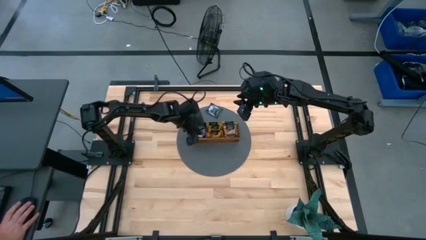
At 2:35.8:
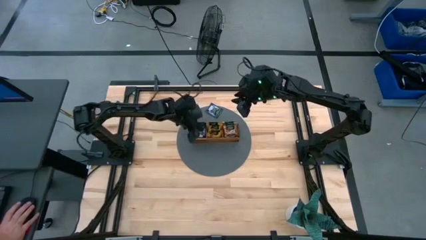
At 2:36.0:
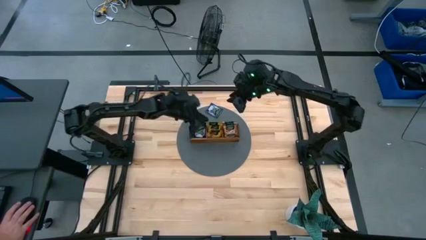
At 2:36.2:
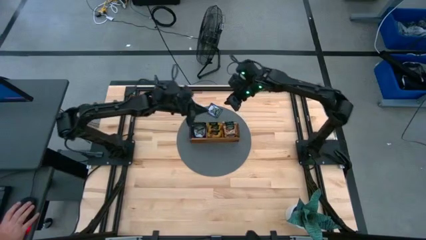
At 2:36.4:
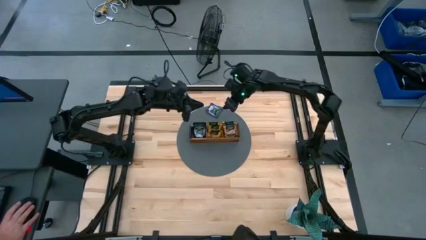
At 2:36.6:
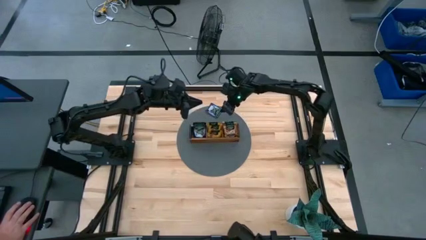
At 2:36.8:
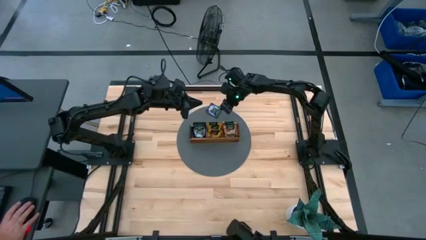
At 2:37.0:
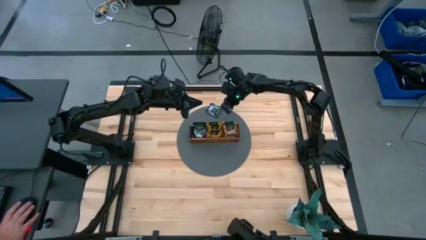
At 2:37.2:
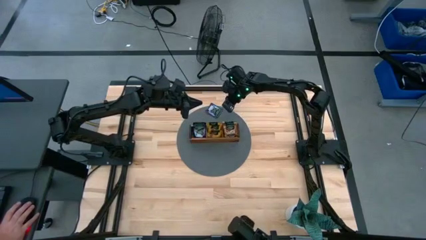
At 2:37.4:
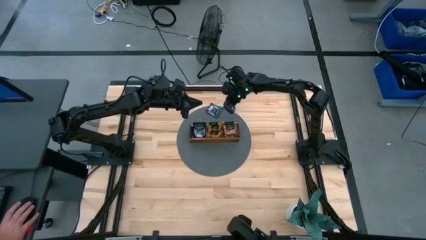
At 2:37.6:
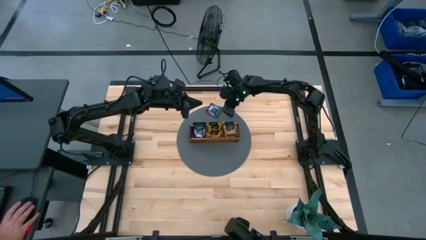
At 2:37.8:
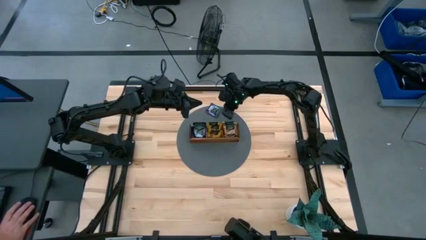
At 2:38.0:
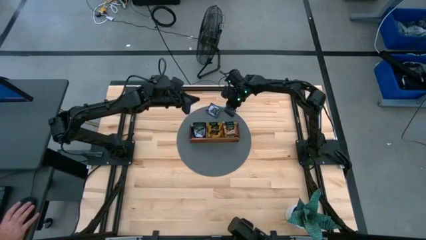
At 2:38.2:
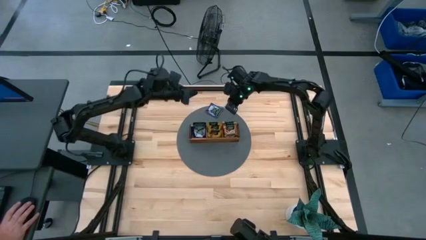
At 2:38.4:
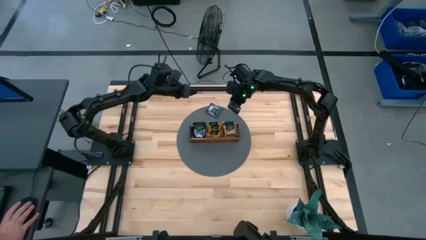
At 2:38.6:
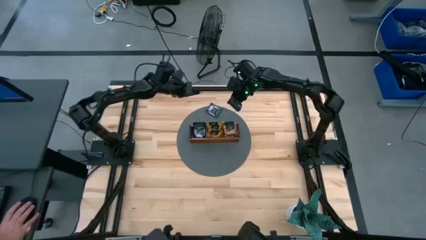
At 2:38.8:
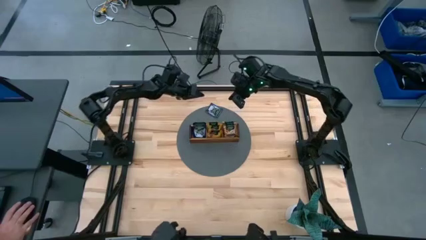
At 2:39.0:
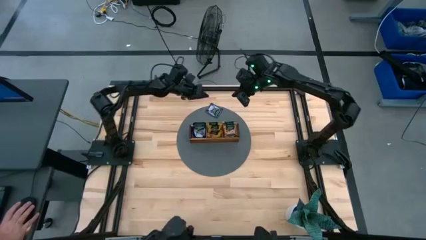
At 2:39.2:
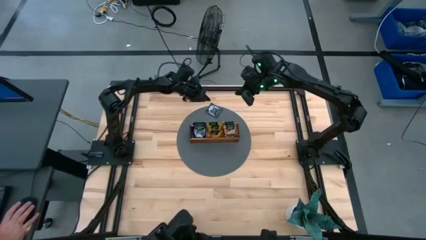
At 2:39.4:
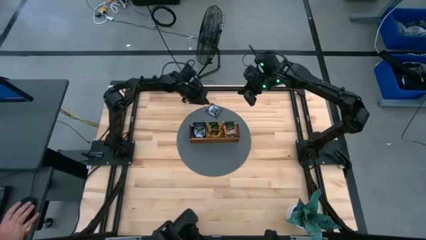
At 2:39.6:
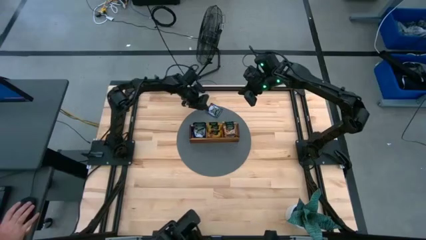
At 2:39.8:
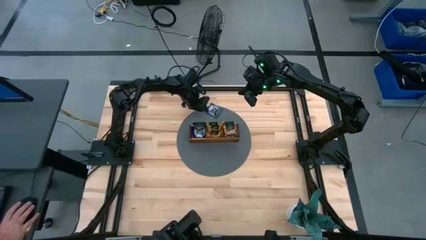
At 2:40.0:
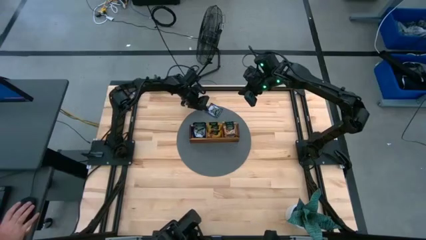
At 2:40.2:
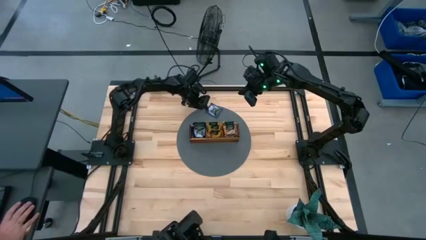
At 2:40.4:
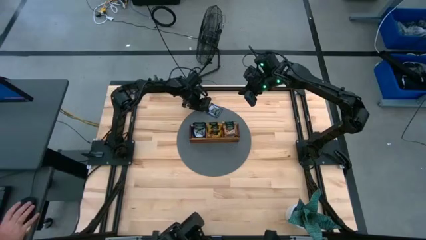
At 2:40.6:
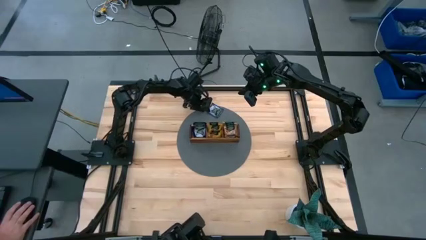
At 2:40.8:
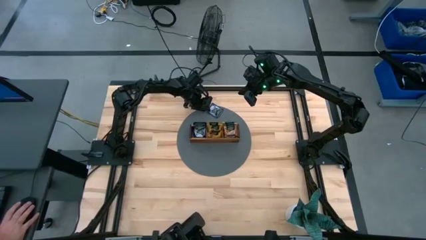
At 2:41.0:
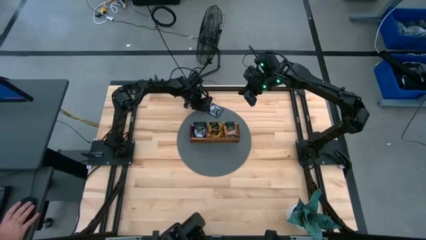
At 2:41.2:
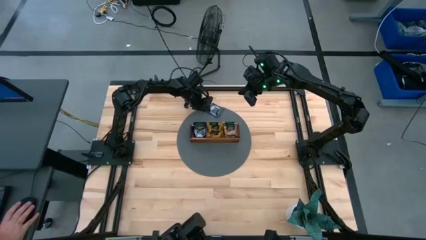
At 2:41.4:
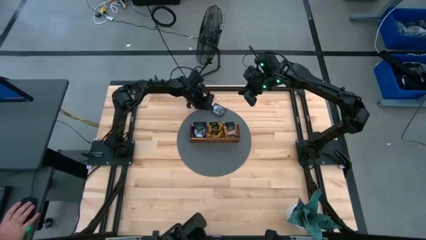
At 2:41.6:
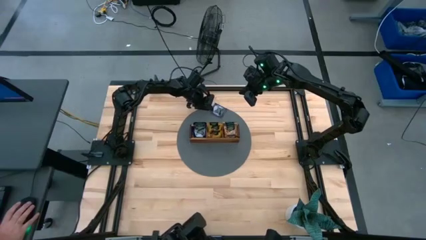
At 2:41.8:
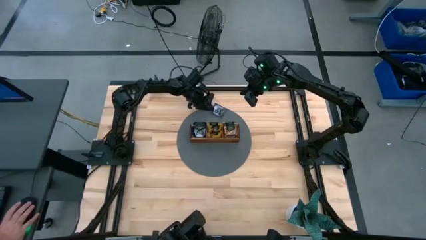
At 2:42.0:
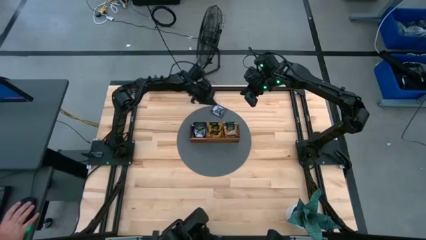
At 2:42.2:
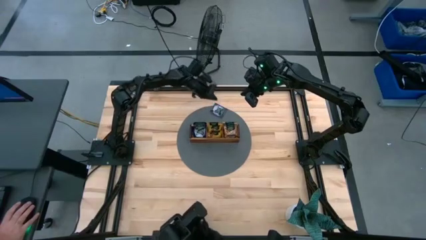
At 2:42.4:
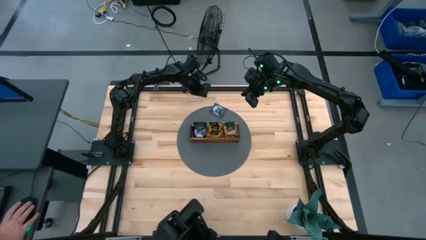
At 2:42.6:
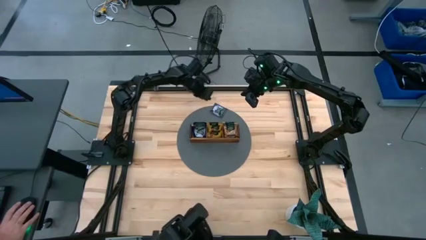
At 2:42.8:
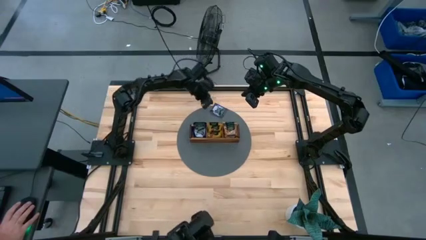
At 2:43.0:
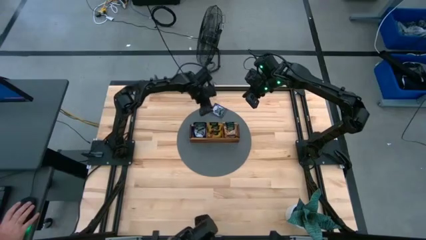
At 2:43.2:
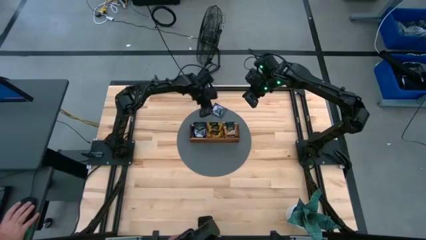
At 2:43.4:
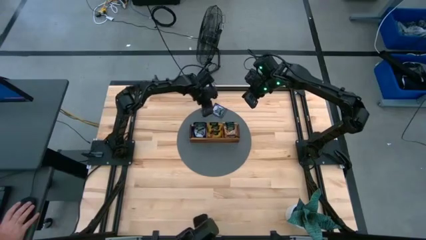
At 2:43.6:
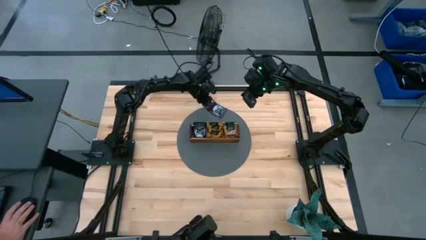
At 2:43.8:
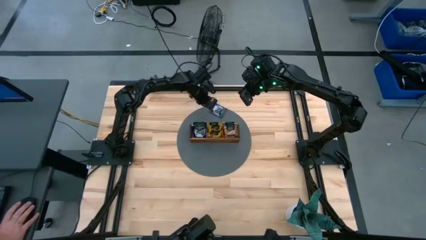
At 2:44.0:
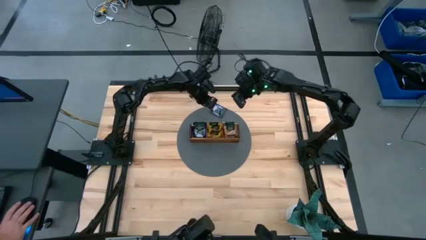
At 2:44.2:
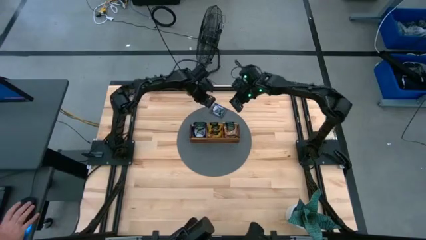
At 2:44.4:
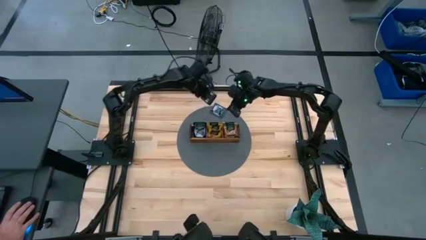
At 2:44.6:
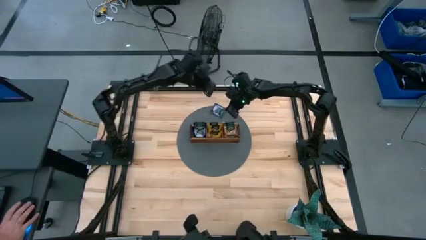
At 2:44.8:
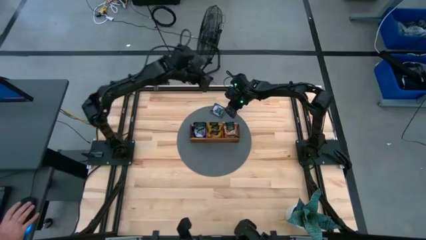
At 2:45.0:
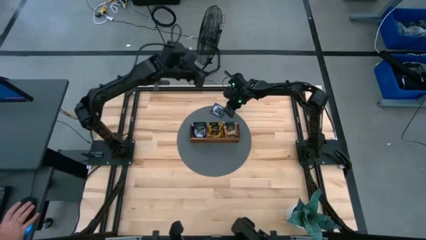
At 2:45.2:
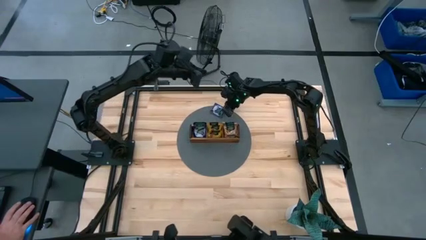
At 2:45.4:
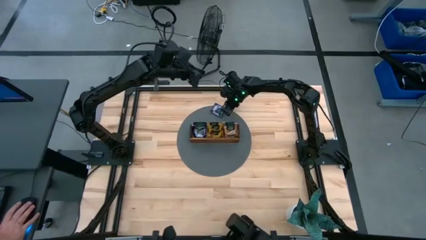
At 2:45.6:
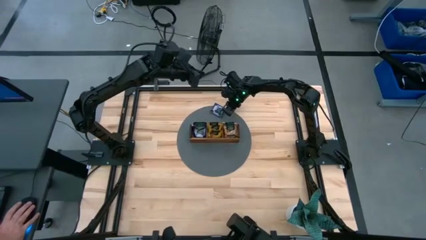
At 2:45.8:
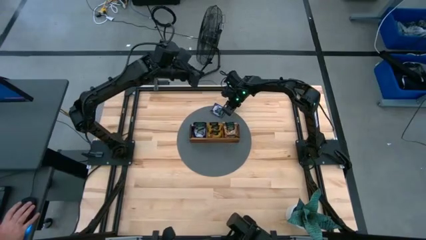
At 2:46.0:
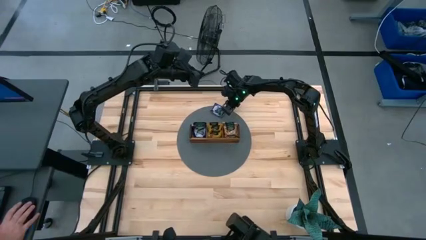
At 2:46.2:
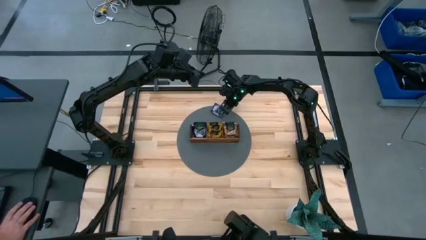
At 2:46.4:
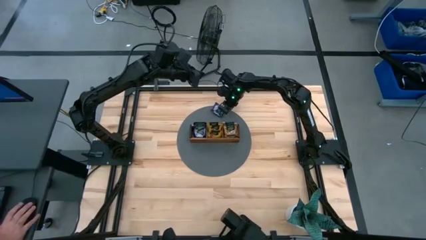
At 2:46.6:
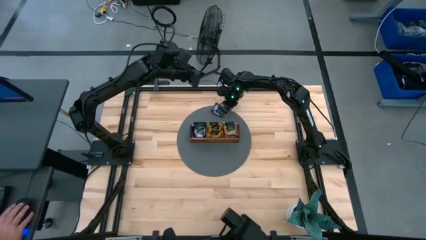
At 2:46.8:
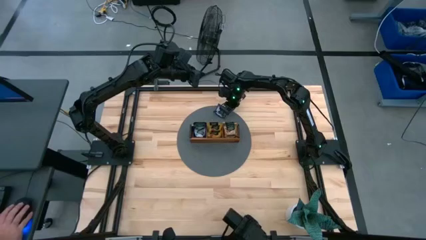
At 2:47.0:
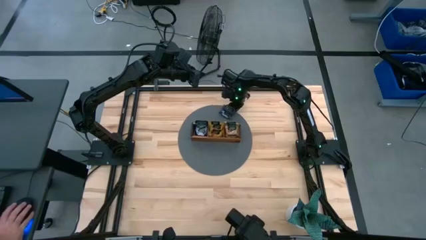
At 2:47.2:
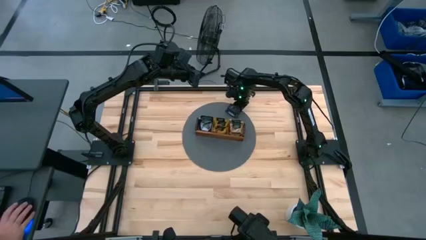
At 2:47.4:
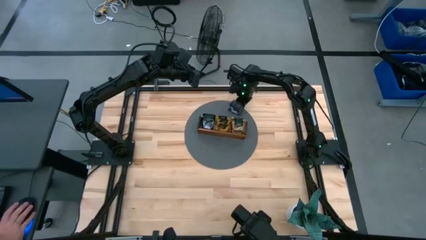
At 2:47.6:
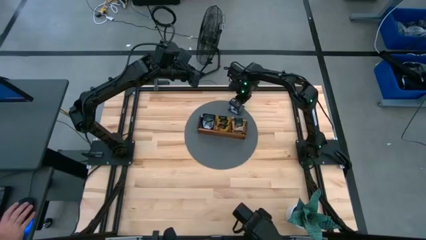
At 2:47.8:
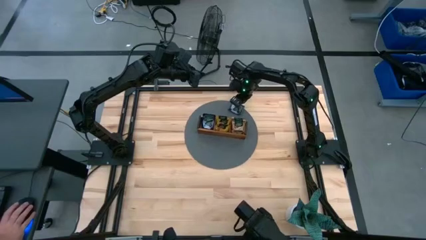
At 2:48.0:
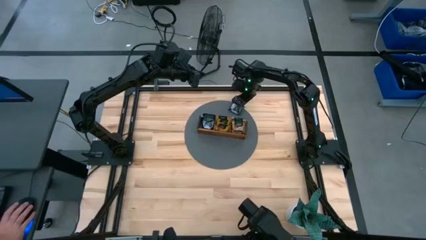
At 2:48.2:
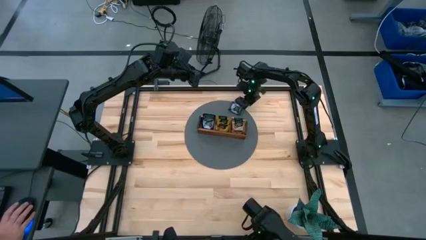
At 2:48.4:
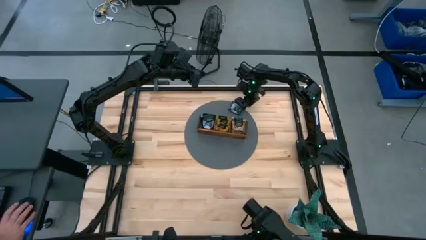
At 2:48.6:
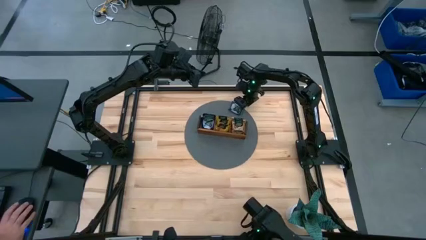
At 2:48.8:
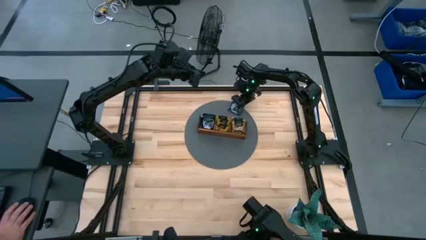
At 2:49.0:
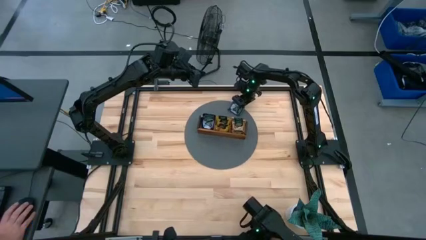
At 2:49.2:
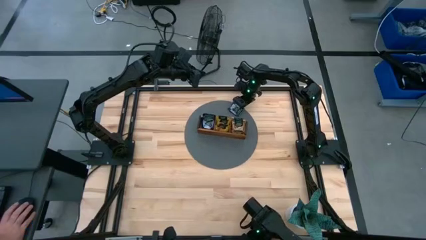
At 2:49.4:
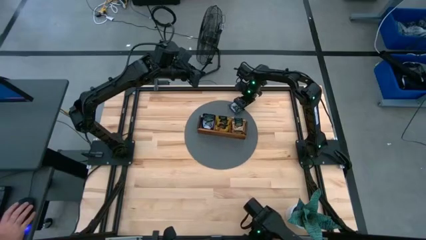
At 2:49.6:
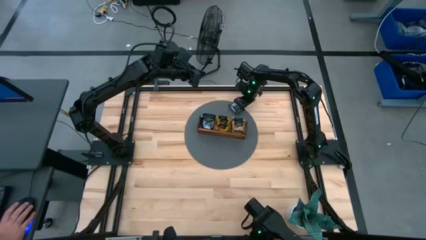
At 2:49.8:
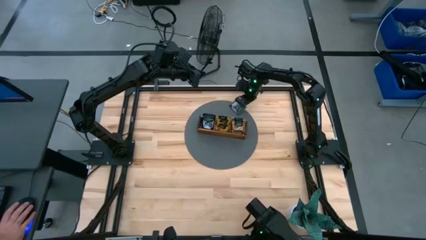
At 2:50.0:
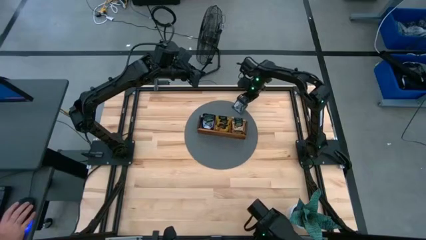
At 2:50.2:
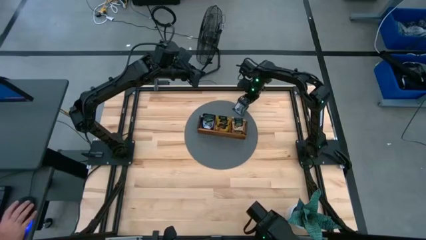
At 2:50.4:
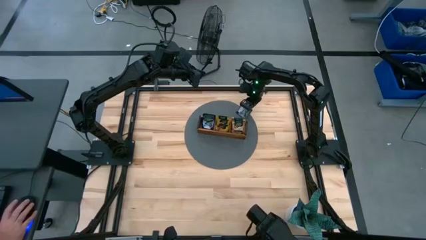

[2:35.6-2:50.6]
Task: Pick & Place Tea
Put the violet tea bag into the left section of the wooden organizer
